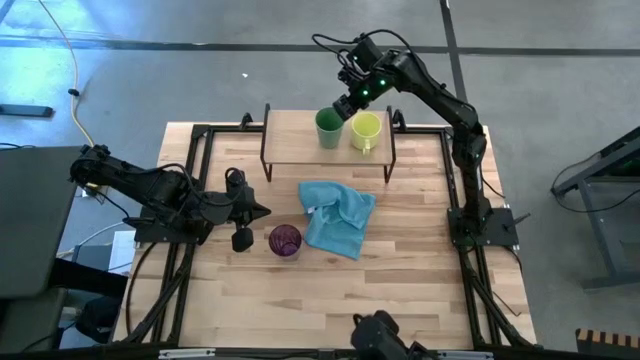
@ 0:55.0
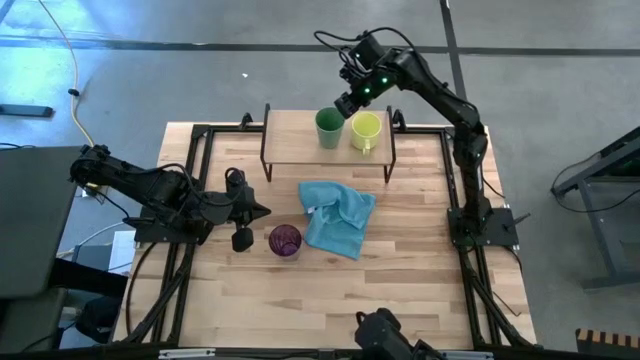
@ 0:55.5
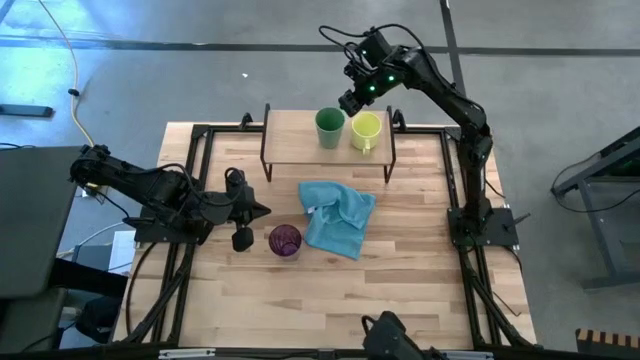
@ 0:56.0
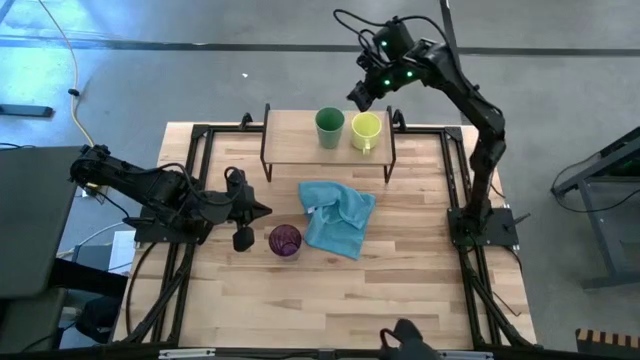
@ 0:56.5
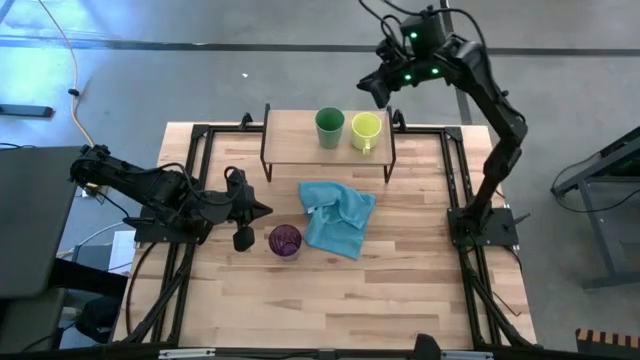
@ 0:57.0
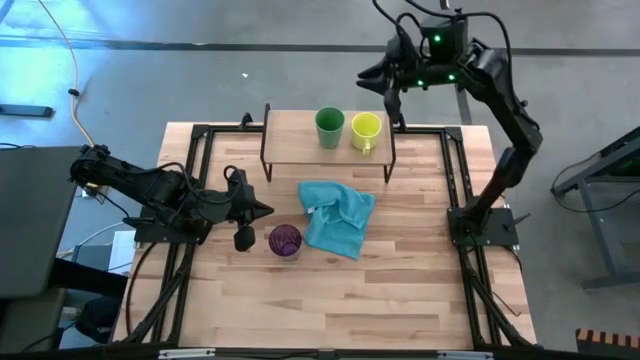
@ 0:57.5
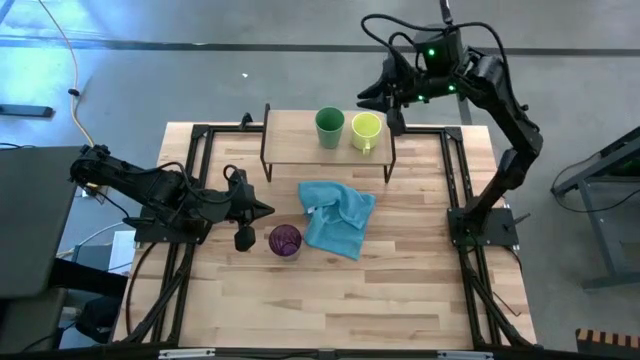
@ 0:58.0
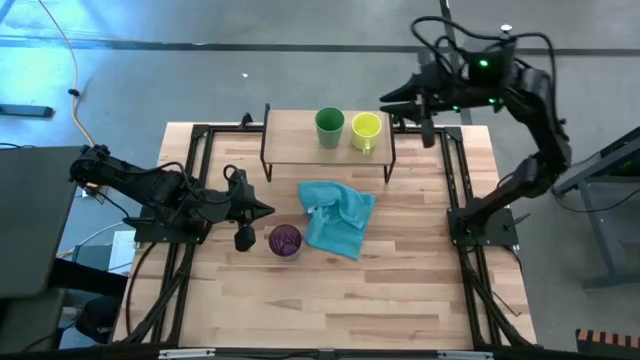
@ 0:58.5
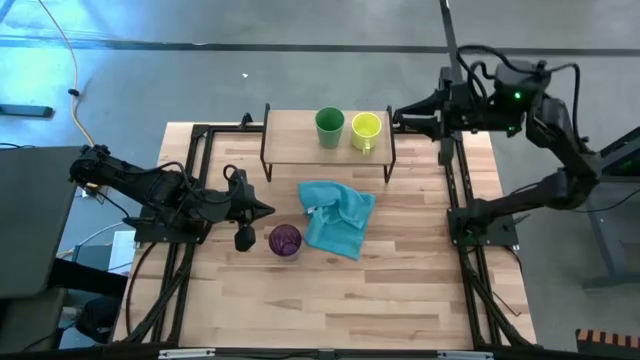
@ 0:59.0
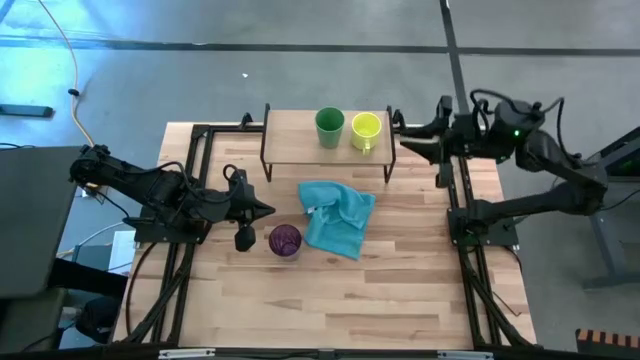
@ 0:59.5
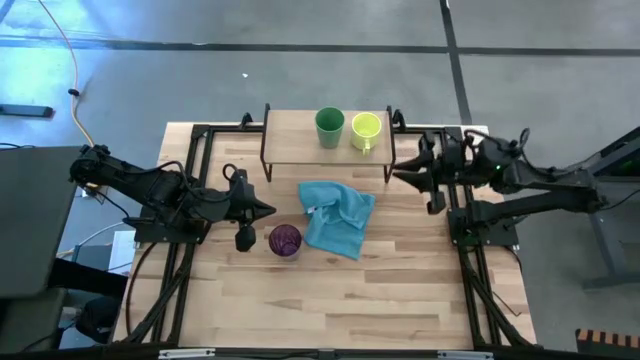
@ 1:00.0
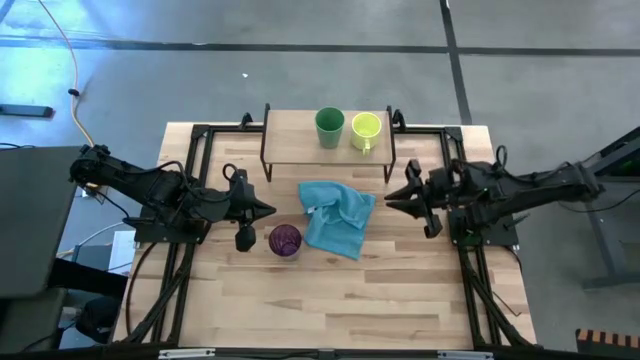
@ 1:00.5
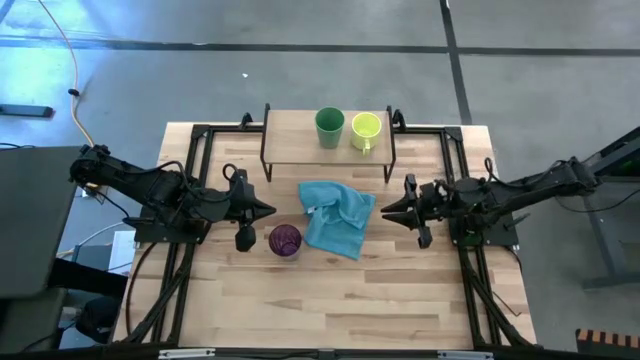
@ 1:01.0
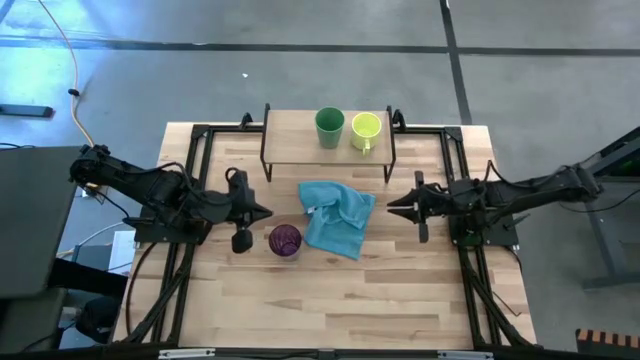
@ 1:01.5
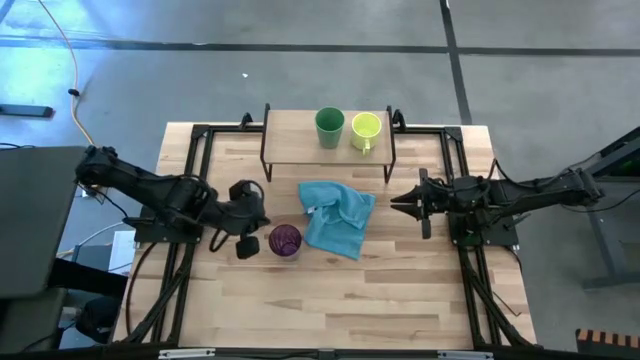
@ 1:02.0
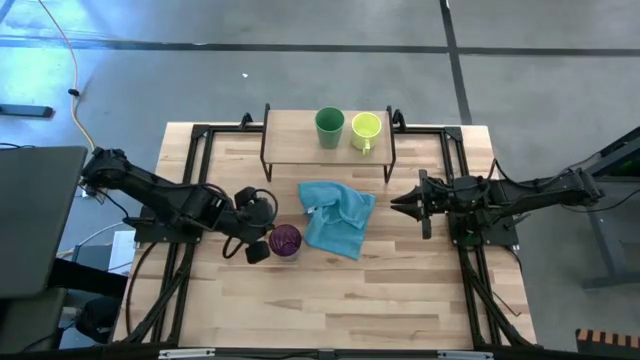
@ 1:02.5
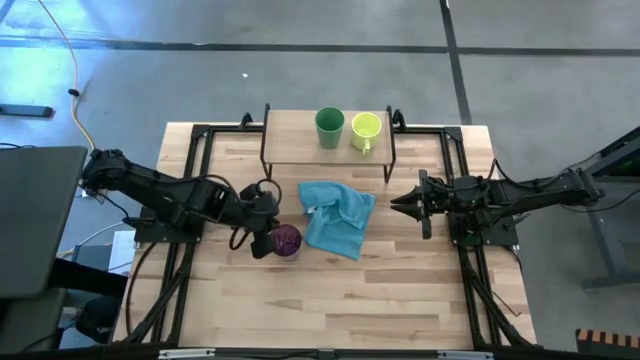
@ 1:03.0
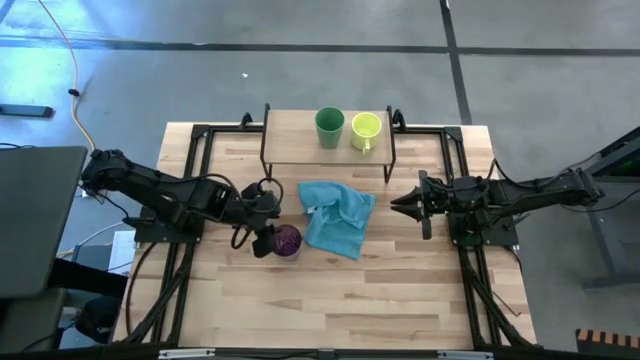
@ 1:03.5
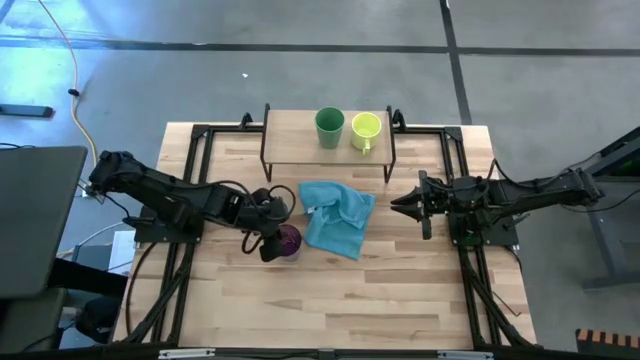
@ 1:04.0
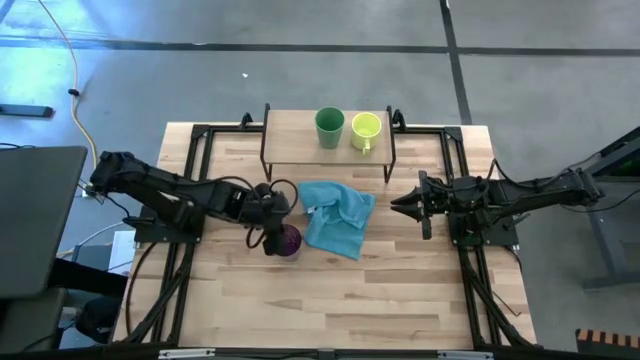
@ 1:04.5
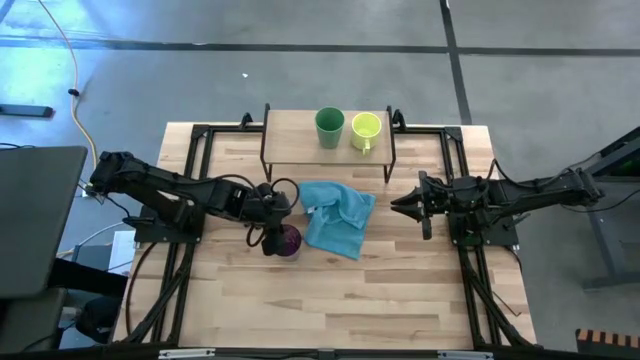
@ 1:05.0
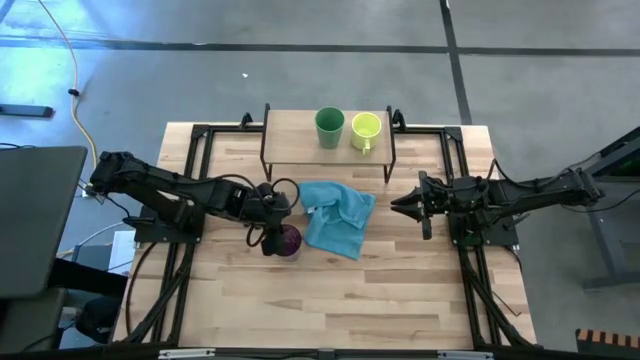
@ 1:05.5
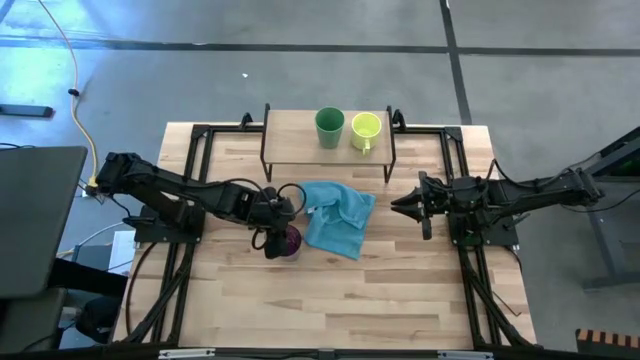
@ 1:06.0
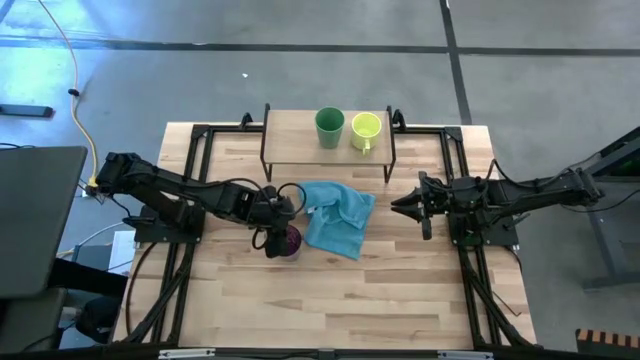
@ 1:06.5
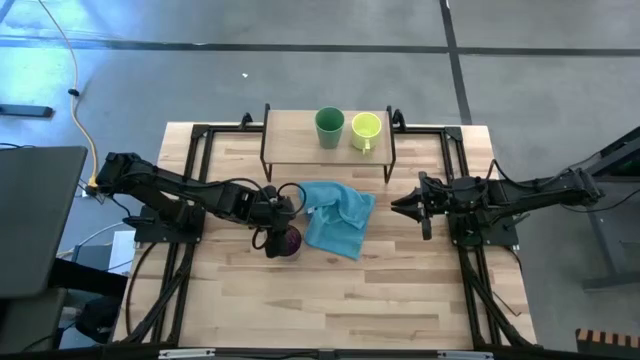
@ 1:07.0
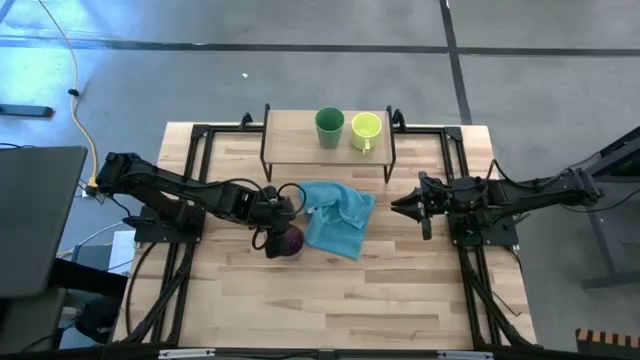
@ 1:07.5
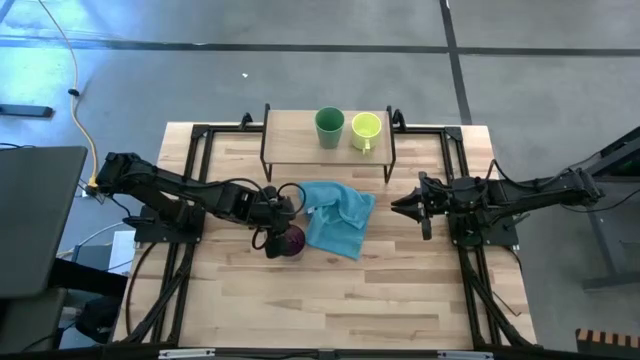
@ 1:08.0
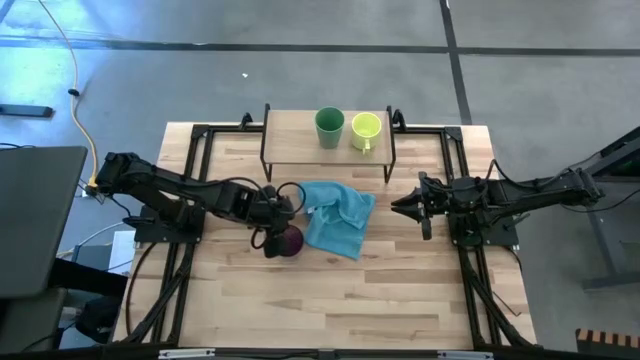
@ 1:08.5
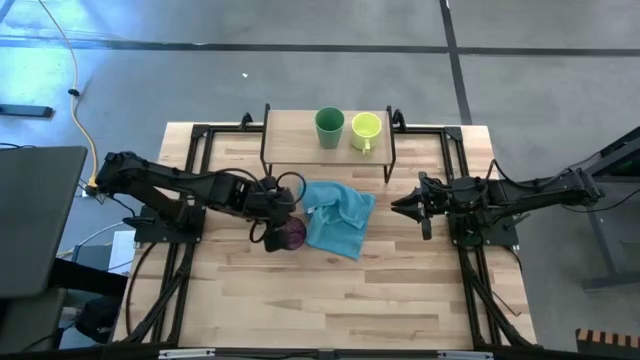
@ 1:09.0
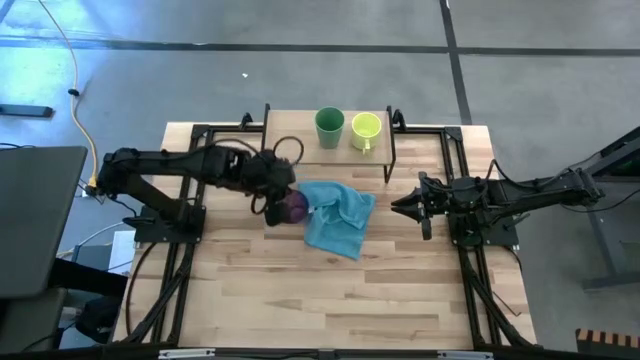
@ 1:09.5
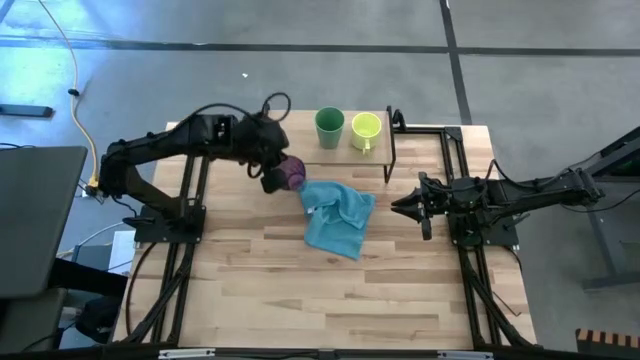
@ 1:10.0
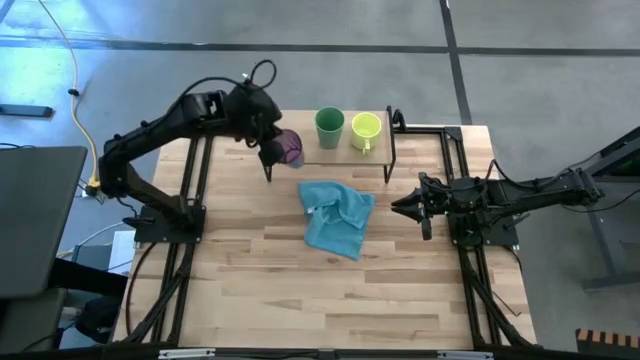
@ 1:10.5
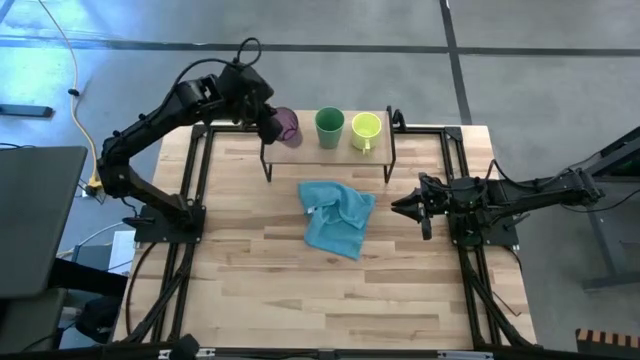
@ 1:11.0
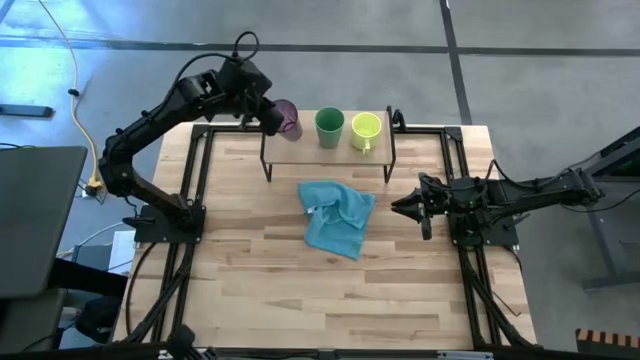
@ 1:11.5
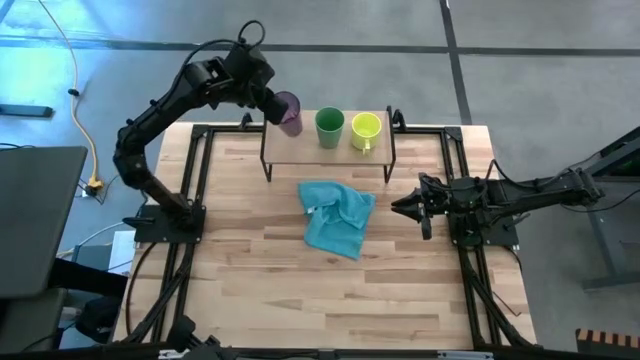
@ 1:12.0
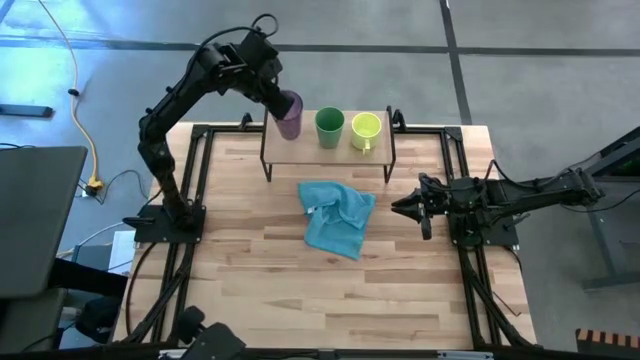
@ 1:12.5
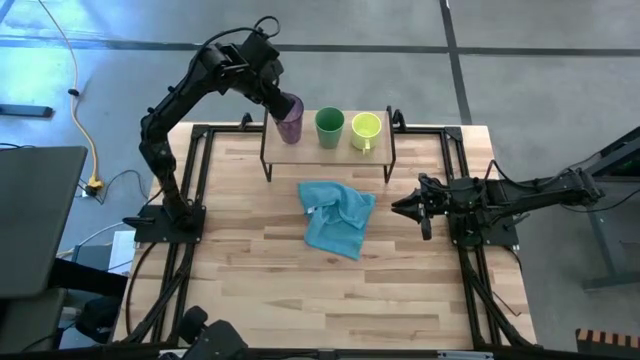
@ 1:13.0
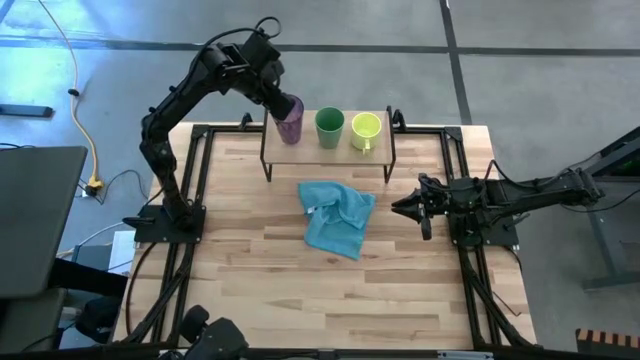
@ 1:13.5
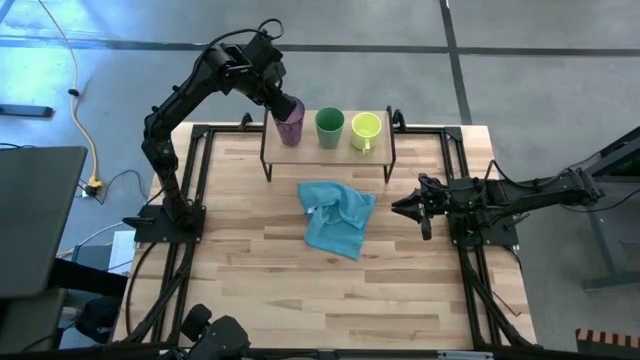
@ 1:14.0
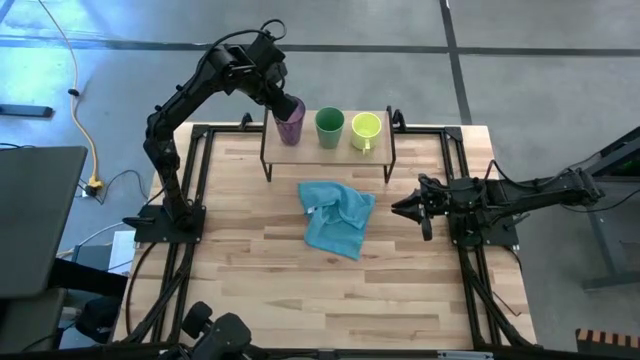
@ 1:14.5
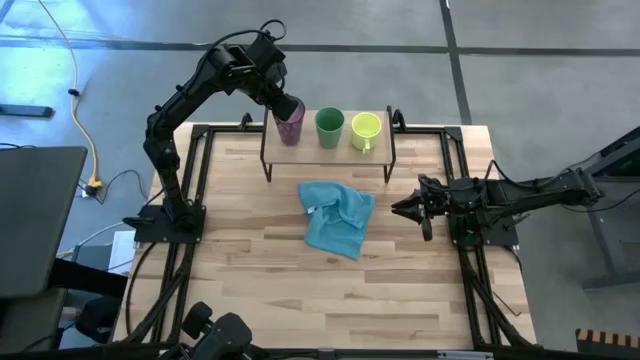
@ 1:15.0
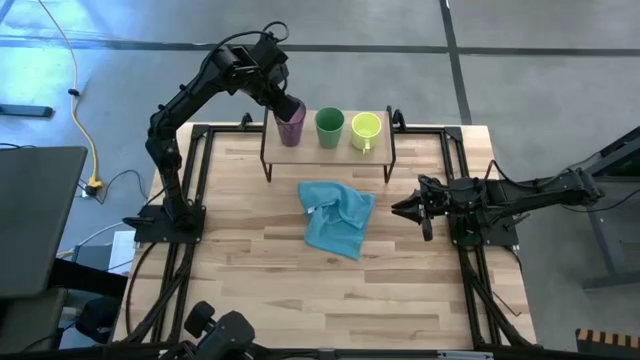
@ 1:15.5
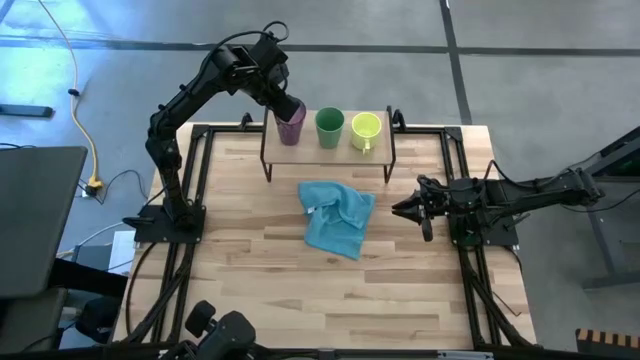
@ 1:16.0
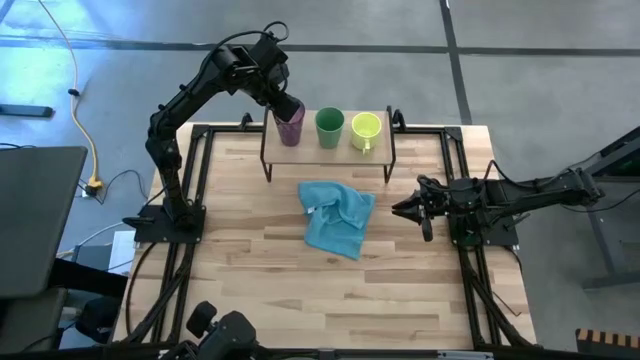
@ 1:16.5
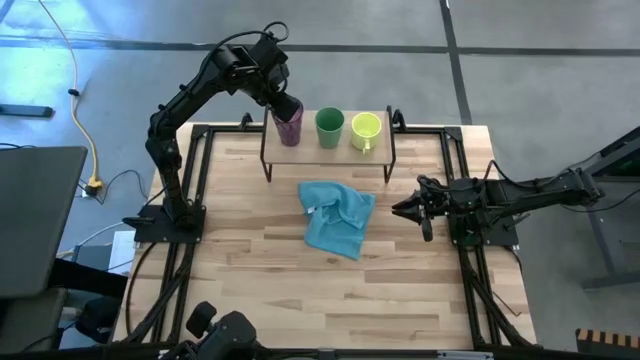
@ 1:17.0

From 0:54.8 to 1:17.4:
Task: Stack small to large cups/mugs on shelf
Put the violet cup on the shelf
